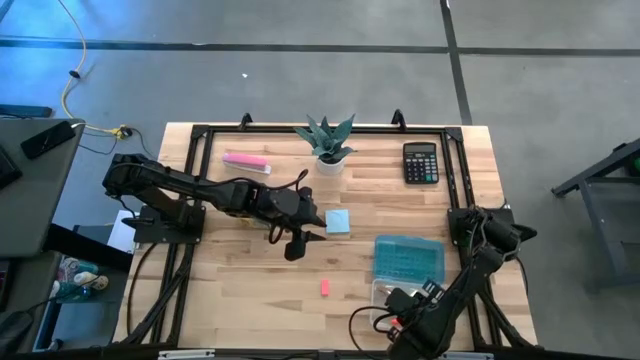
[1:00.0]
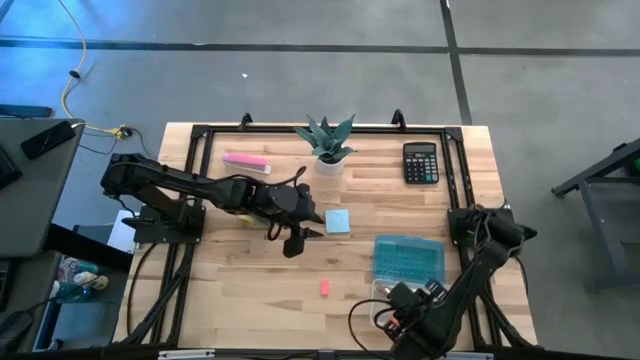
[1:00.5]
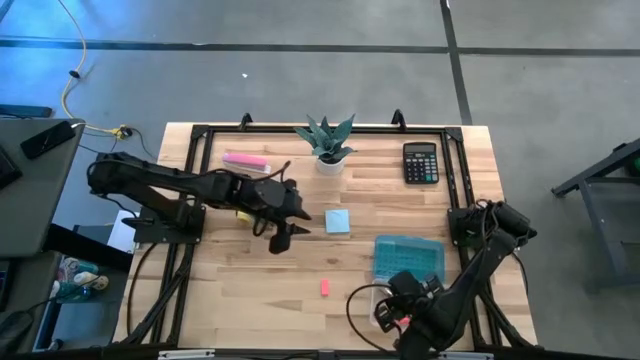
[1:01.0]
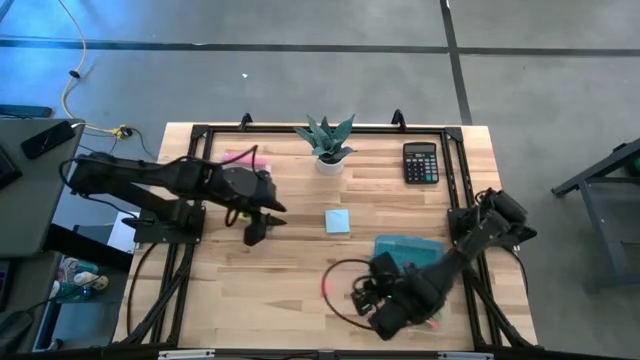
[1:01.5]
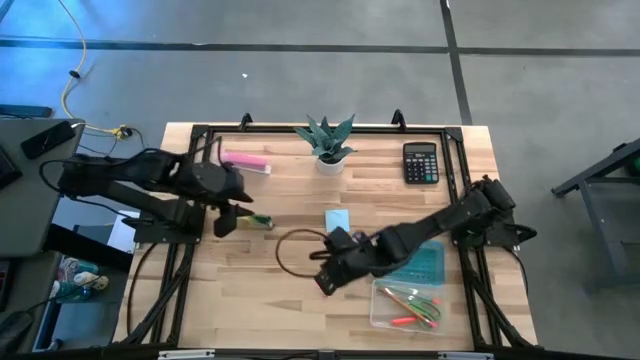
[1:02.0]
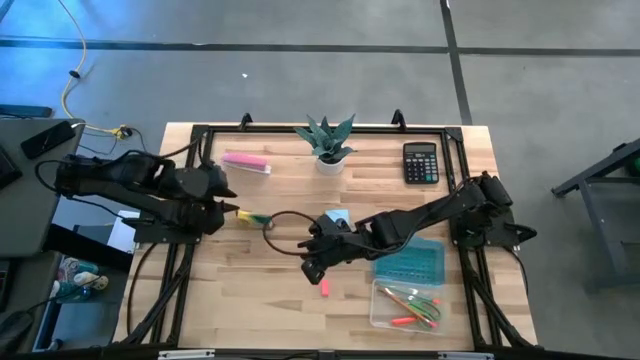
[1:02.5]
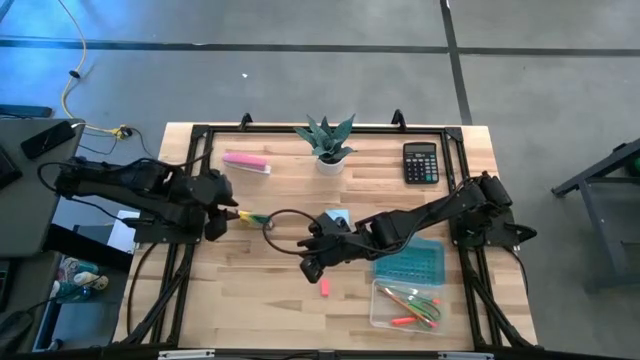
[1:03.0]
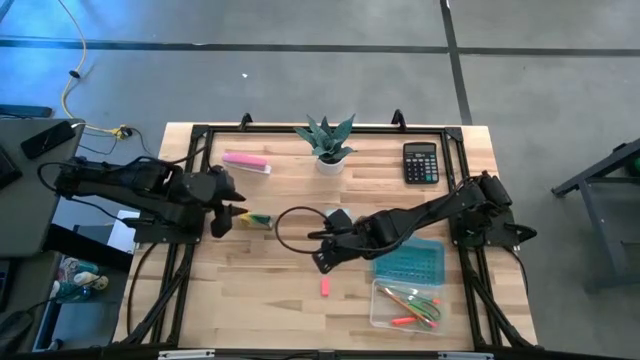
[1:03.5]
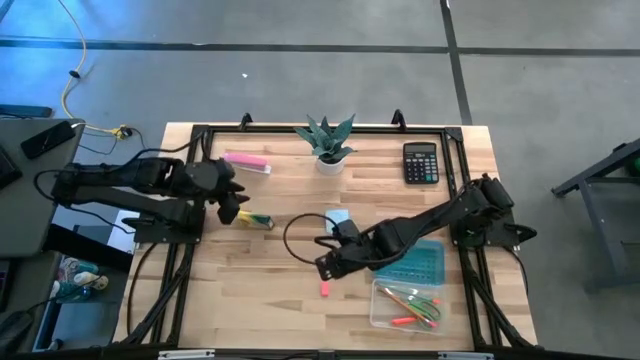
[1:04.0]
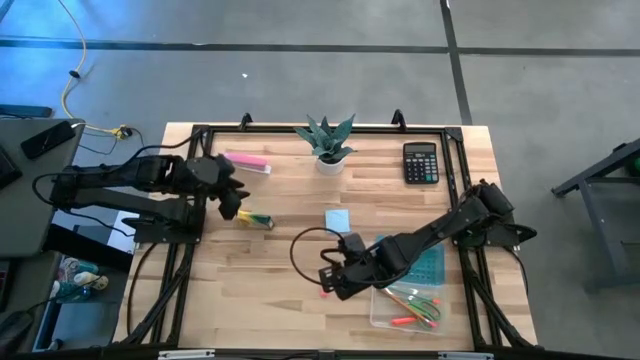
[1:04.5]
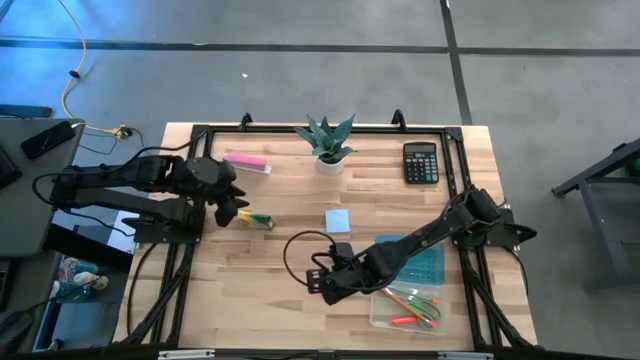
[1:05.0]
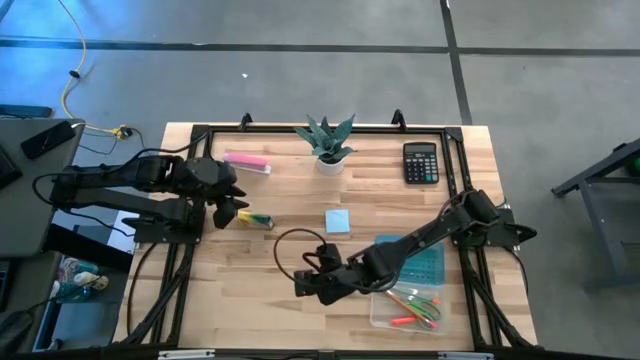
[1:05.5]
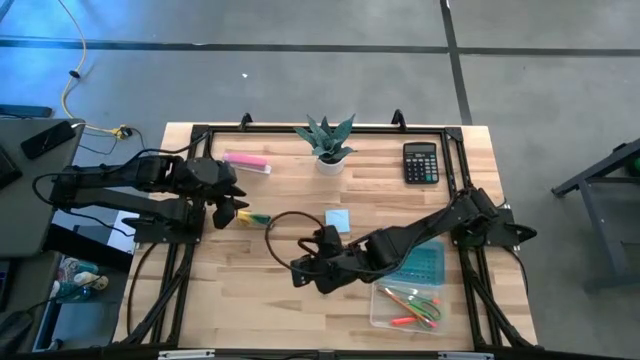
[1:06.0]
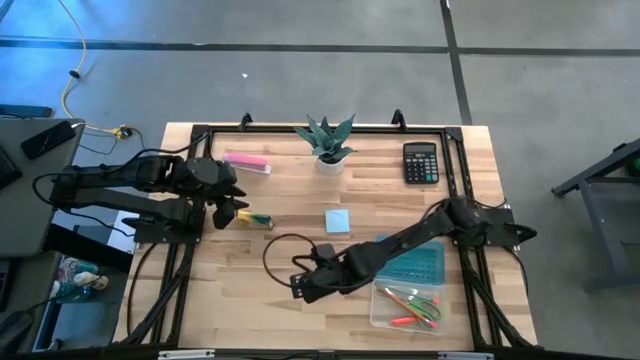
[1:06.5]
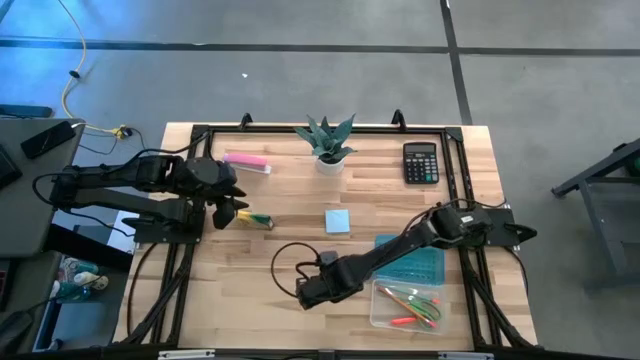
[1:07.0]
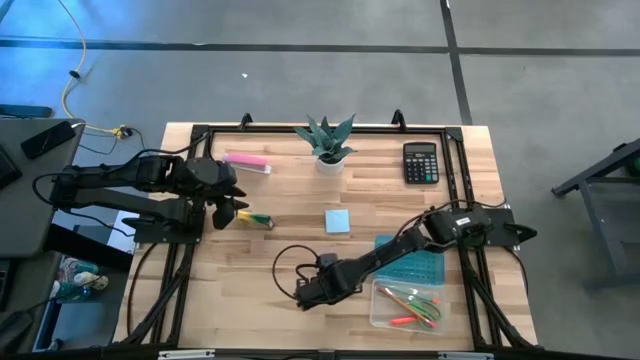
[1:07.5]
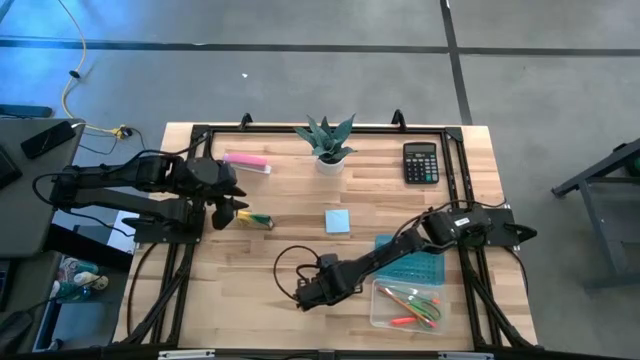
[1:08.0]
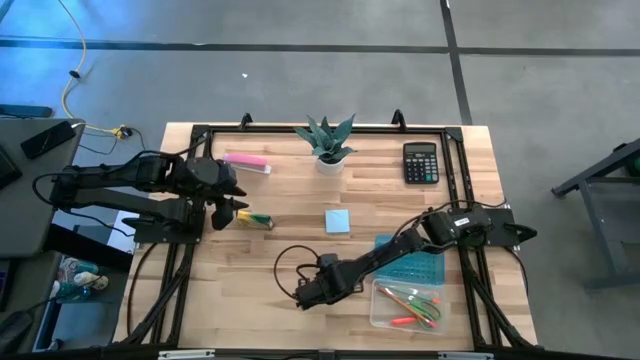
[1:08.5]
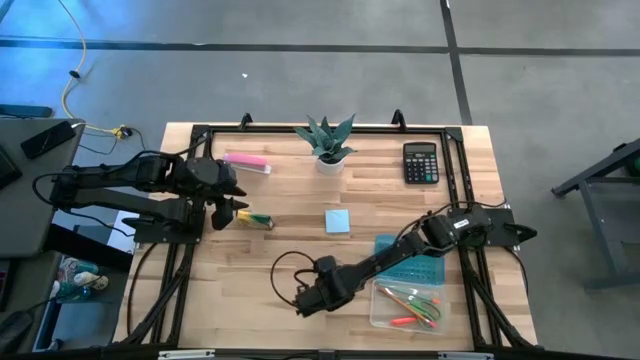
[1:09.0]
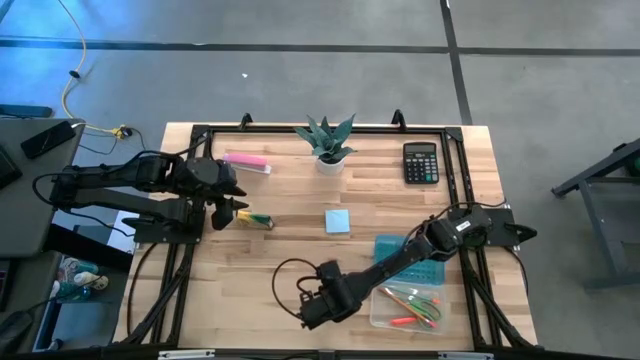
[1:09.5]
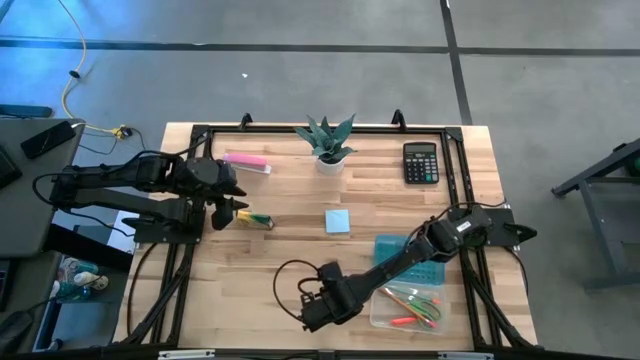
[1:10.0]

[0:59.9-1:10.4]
Task: Pack school essentials
Put the pink eraser into the blue supply box

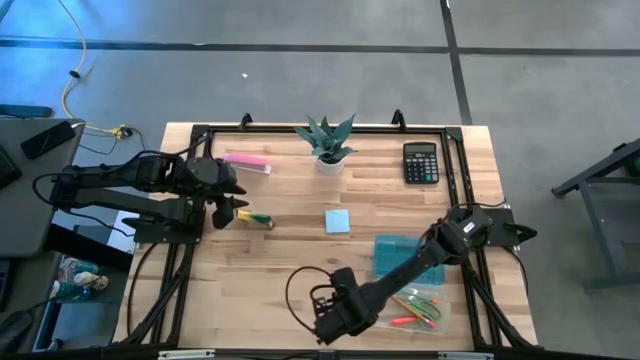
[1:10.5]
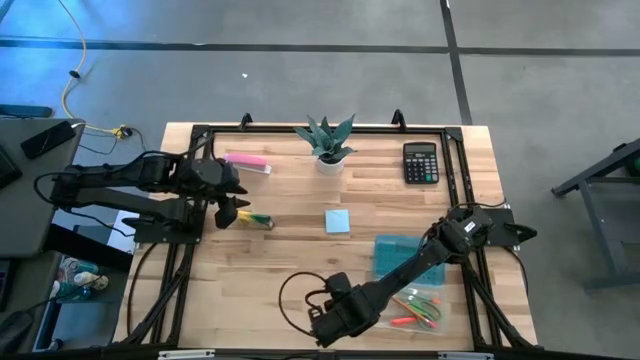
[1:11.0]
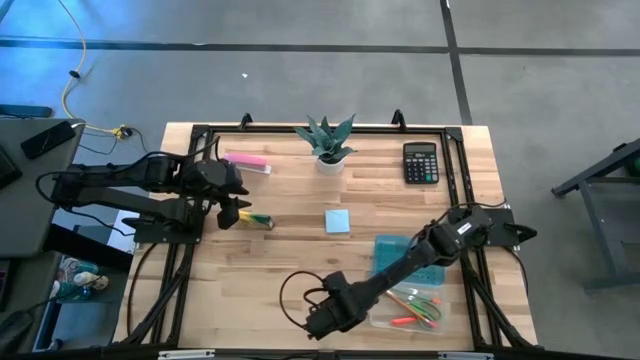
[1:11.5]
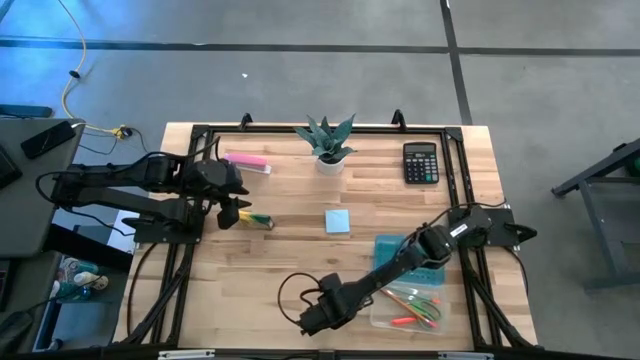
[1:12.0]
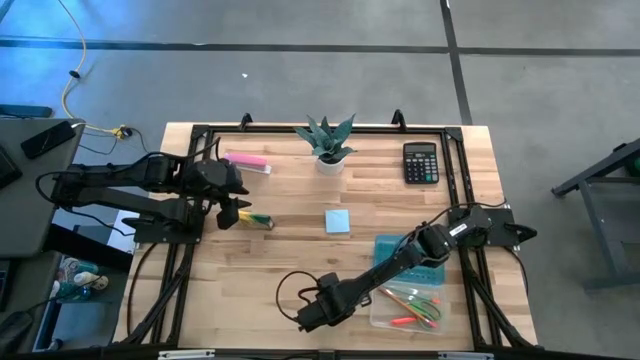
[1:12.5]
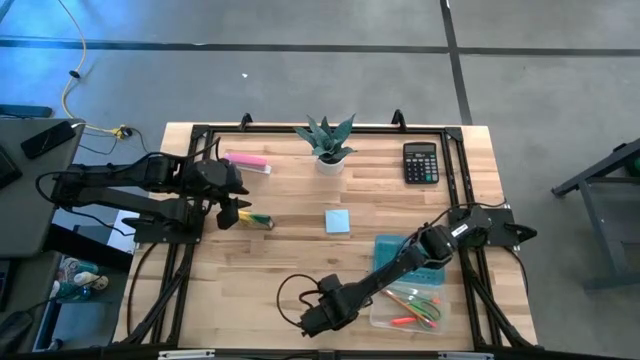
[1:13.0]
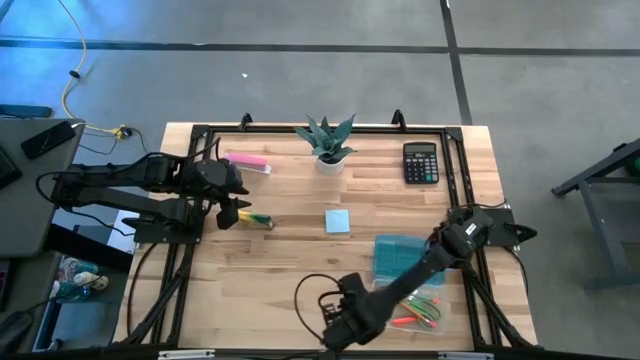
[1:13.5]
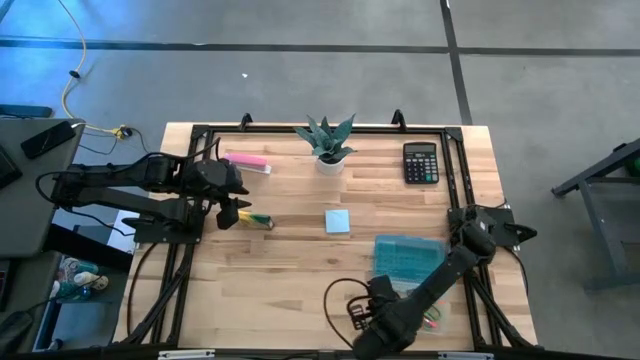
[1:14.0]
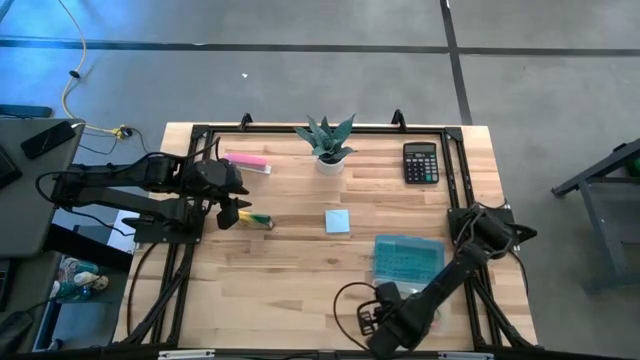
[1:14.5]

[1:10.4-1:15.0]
Put the pink eraser into the blue supply box

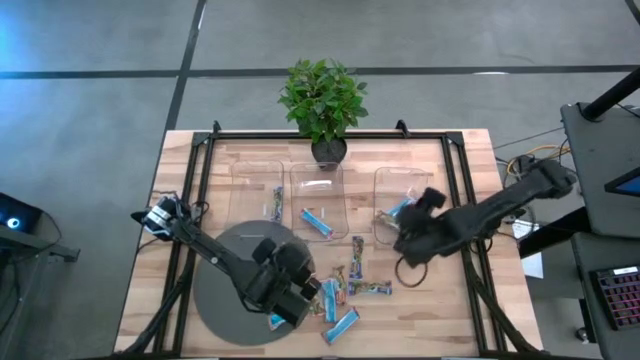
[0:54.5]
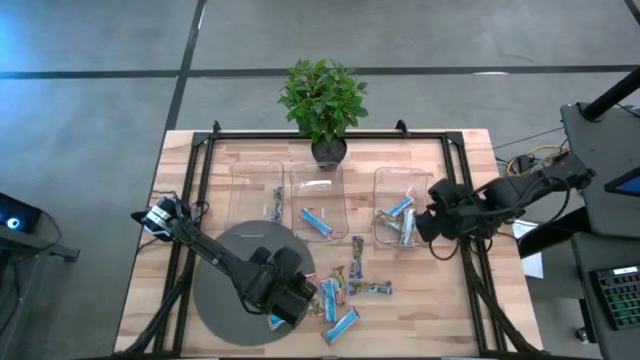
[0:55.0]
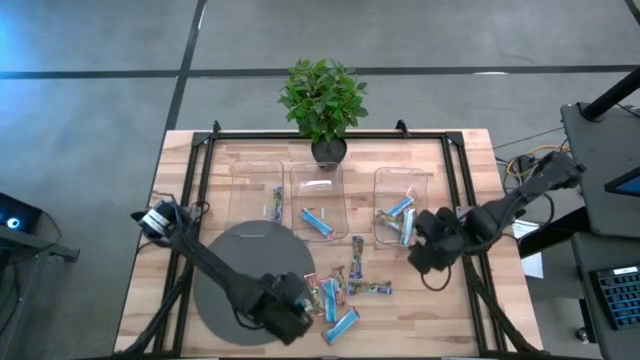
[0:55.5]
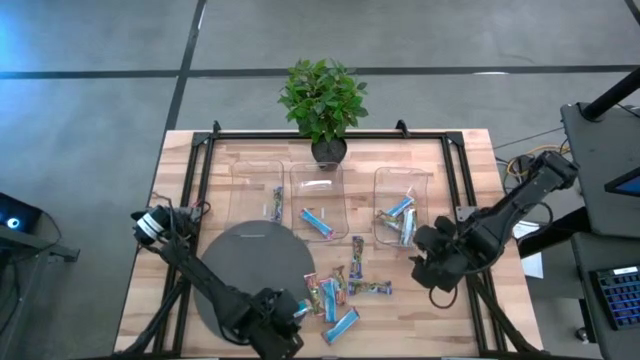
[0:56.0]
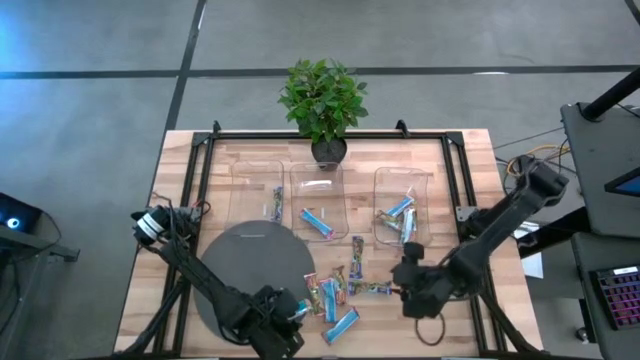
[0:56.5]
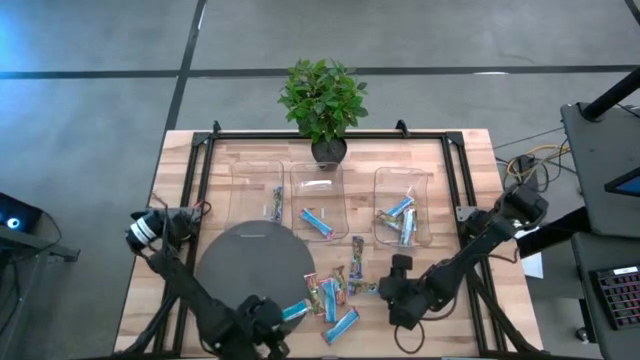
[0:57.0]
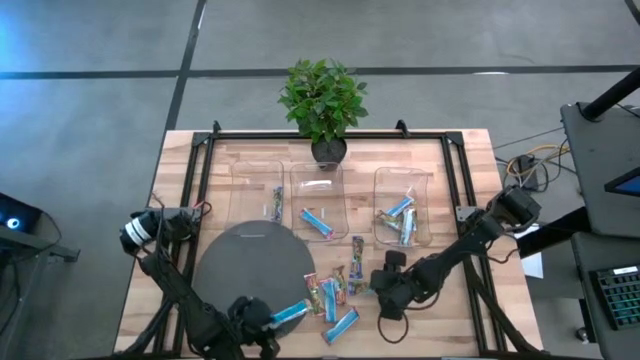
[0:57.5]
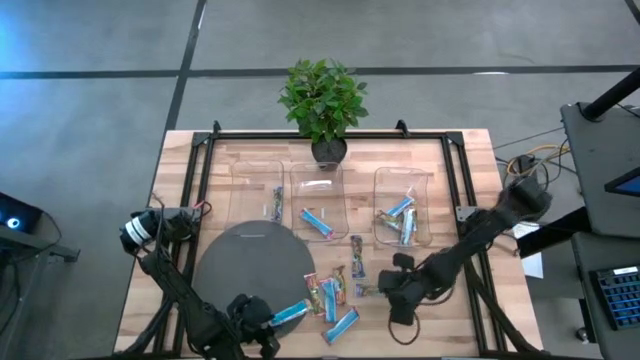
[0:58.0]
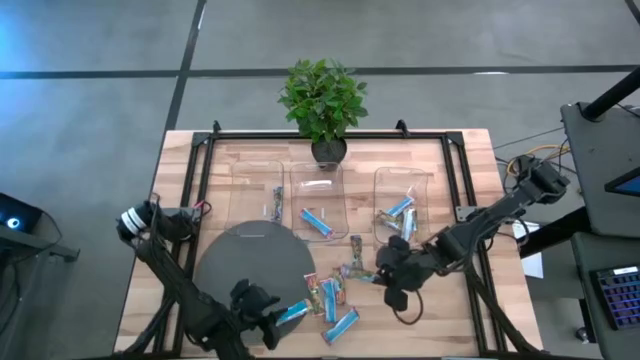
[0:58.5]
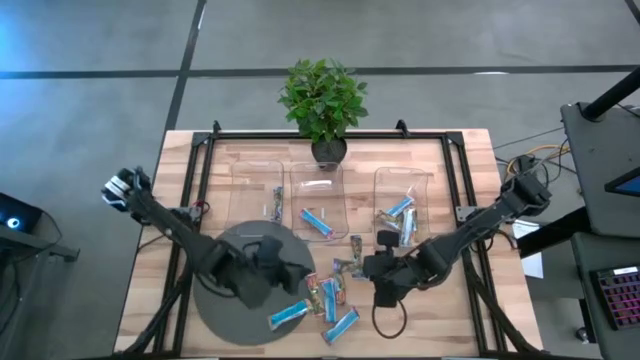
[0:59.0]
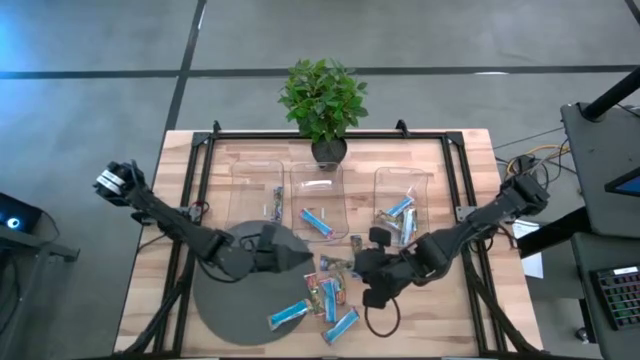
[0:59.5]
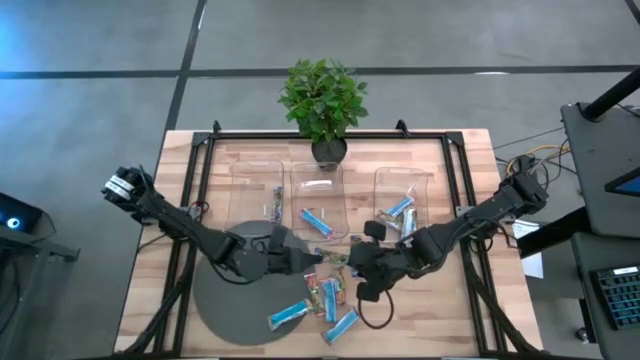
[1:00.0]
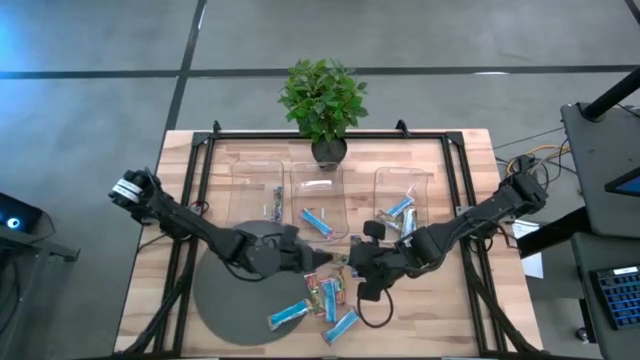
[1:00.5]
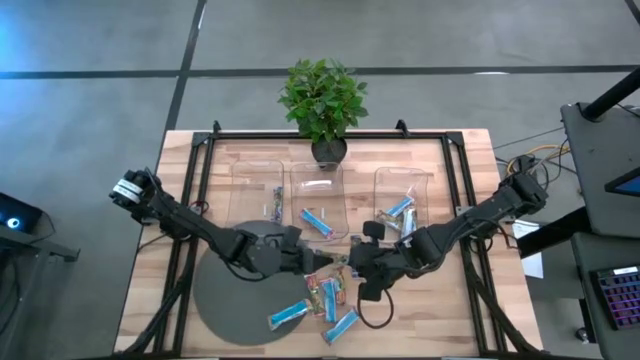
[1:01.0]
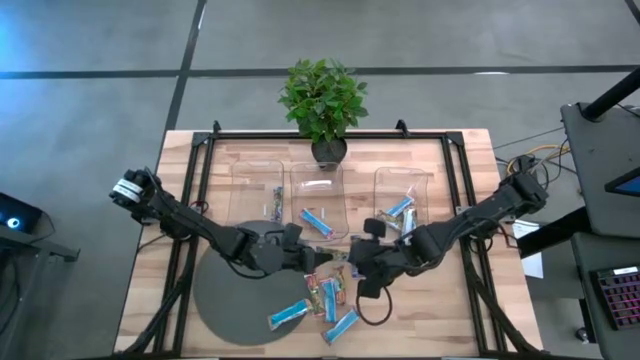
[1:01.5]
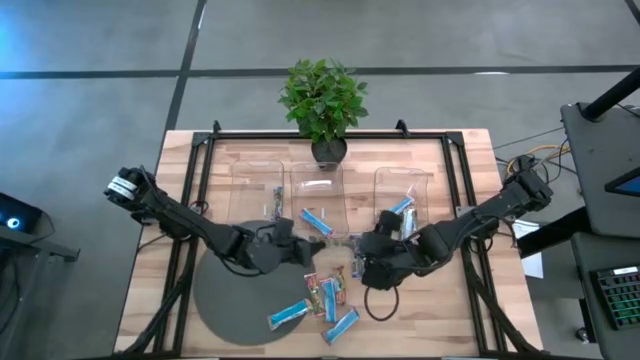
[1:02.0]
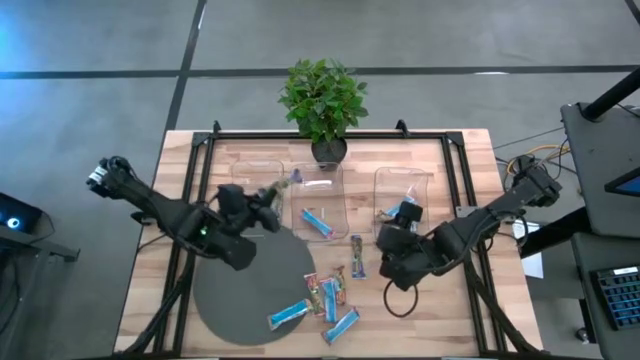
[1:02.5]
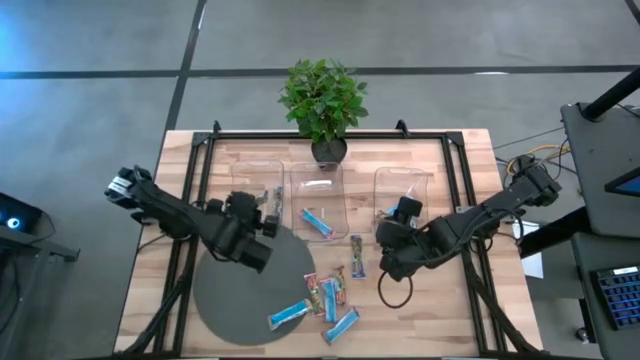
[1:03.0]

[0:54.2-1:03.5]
Task: Pick and place Granola Bars by type
Put the violet granola bar into the left transparent bin
